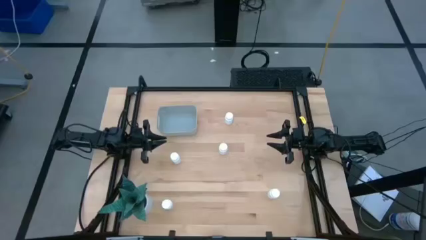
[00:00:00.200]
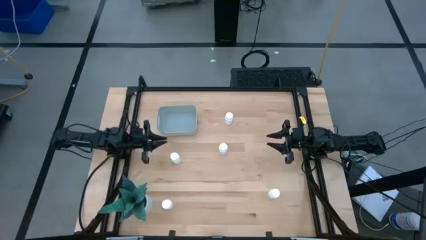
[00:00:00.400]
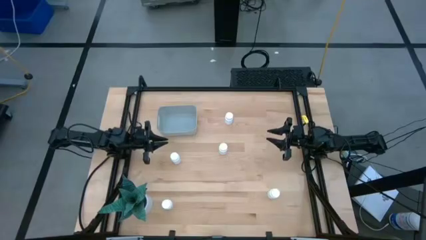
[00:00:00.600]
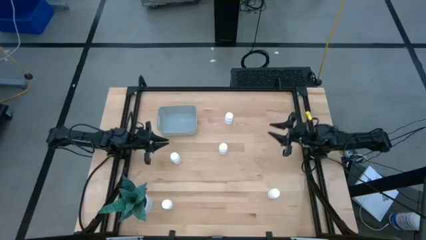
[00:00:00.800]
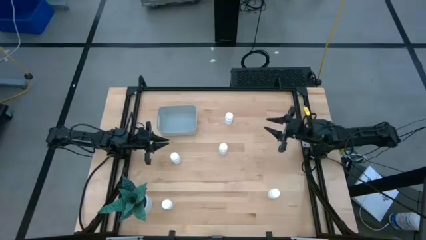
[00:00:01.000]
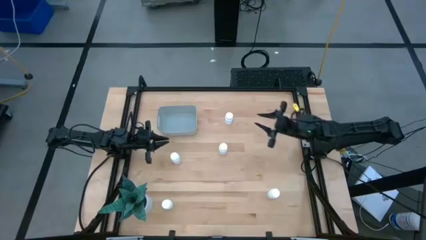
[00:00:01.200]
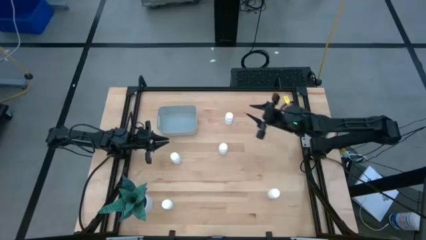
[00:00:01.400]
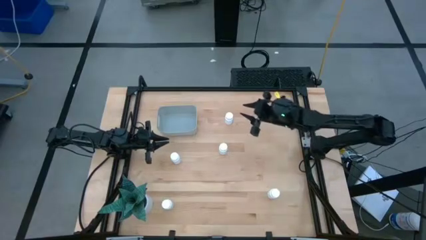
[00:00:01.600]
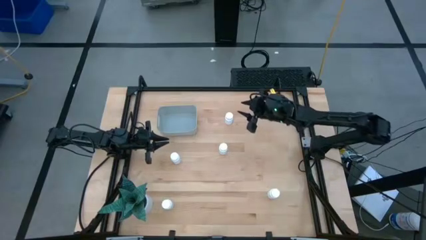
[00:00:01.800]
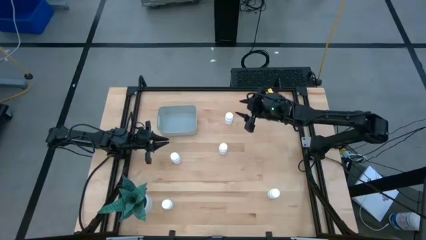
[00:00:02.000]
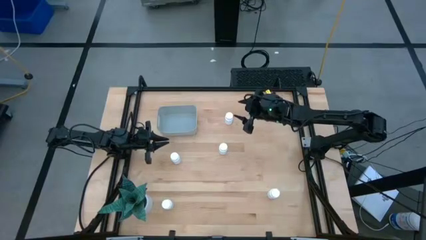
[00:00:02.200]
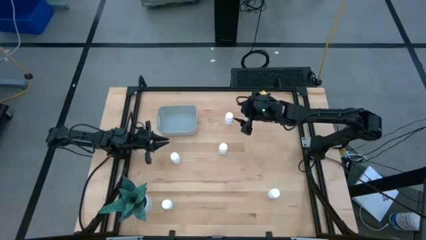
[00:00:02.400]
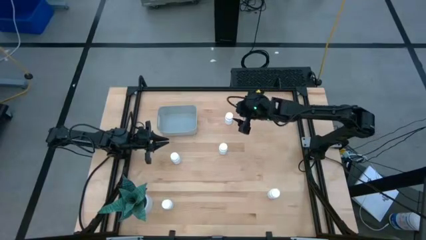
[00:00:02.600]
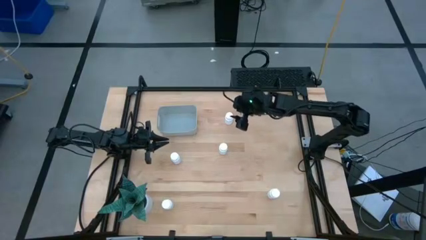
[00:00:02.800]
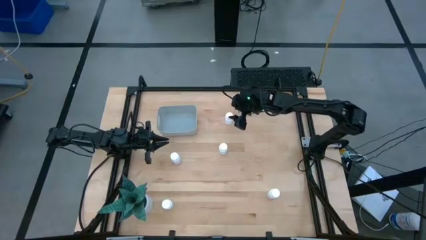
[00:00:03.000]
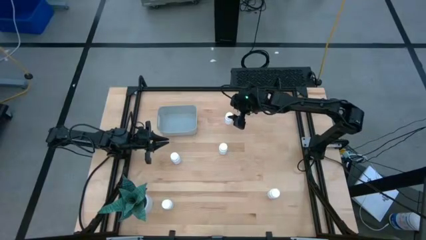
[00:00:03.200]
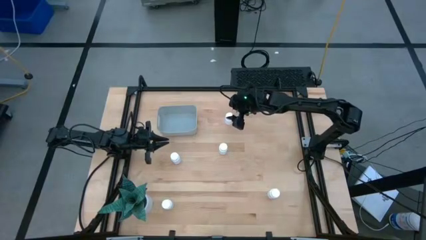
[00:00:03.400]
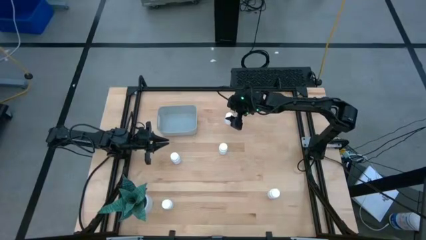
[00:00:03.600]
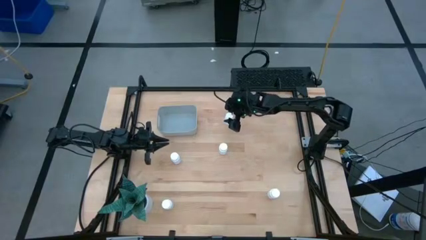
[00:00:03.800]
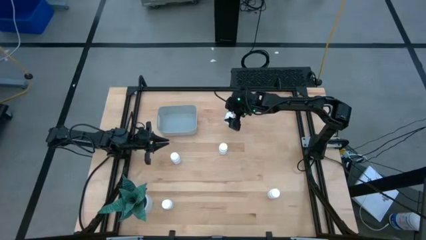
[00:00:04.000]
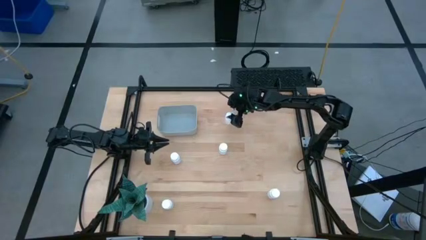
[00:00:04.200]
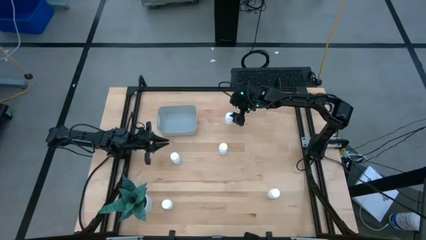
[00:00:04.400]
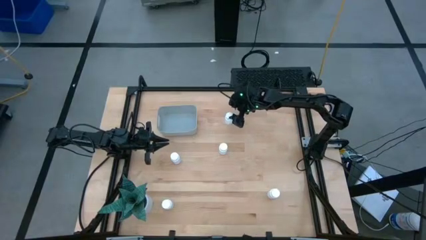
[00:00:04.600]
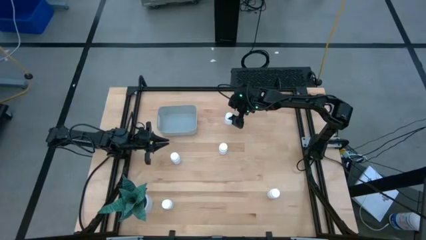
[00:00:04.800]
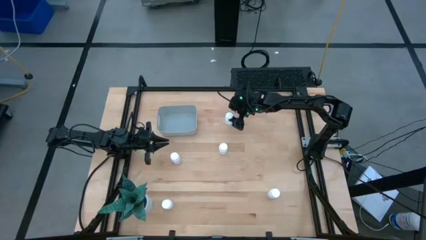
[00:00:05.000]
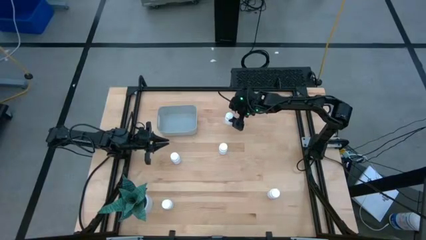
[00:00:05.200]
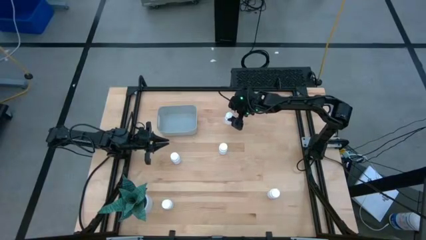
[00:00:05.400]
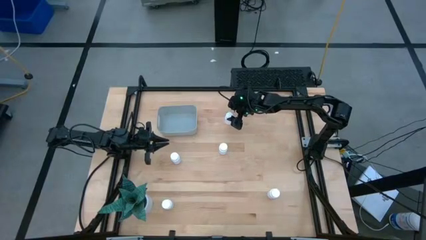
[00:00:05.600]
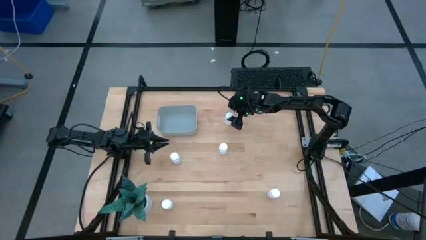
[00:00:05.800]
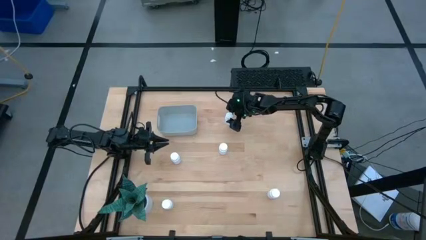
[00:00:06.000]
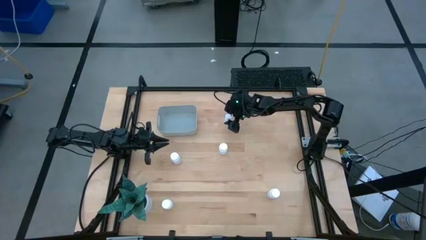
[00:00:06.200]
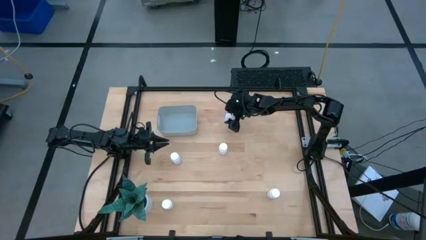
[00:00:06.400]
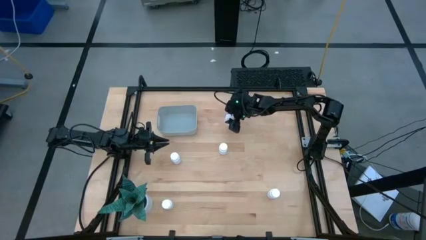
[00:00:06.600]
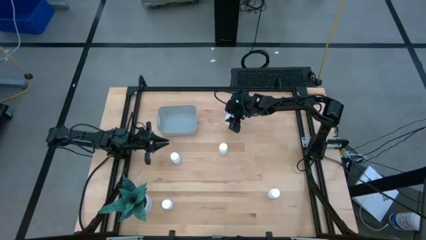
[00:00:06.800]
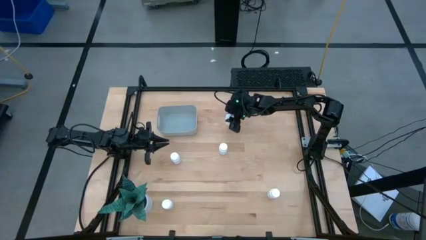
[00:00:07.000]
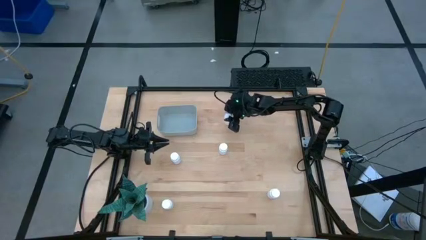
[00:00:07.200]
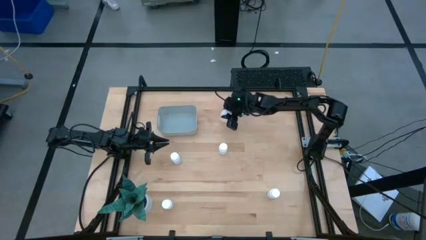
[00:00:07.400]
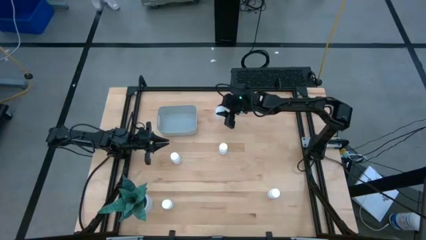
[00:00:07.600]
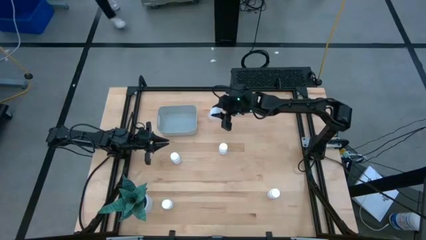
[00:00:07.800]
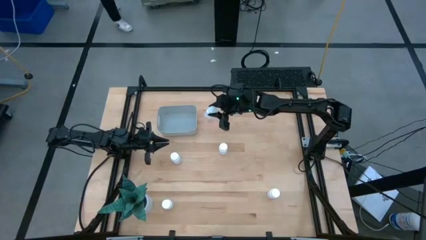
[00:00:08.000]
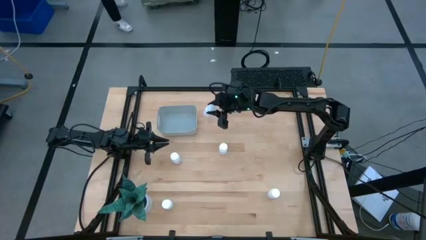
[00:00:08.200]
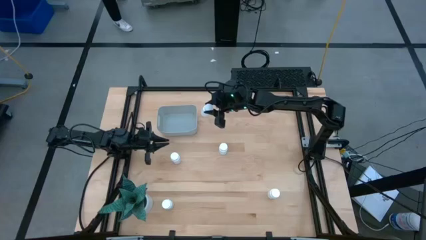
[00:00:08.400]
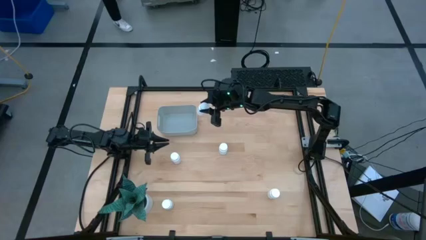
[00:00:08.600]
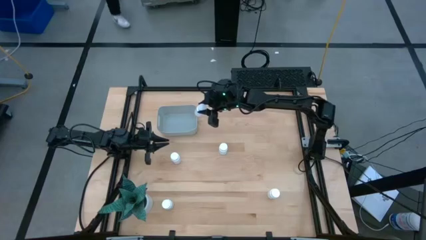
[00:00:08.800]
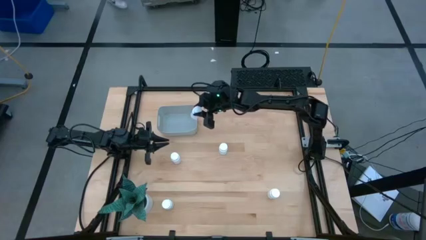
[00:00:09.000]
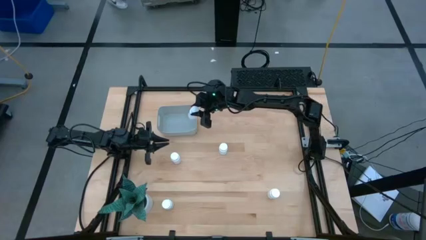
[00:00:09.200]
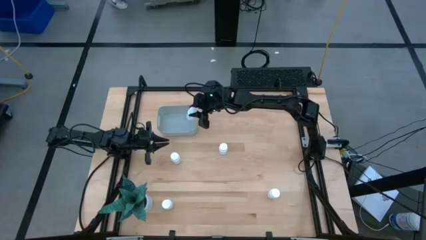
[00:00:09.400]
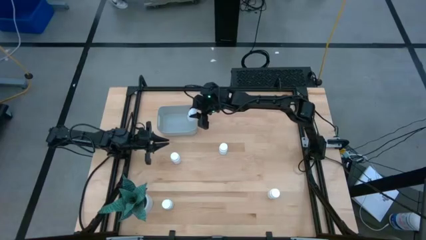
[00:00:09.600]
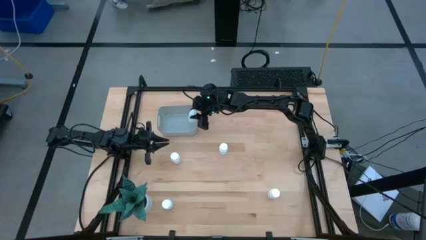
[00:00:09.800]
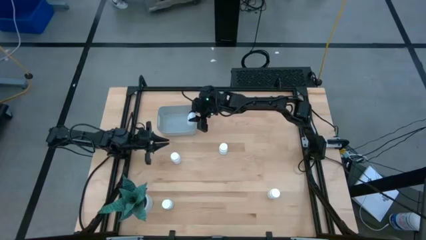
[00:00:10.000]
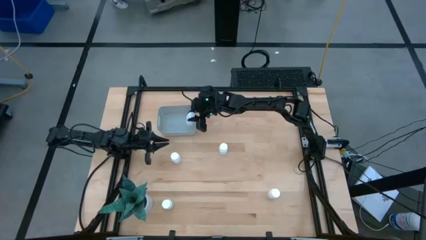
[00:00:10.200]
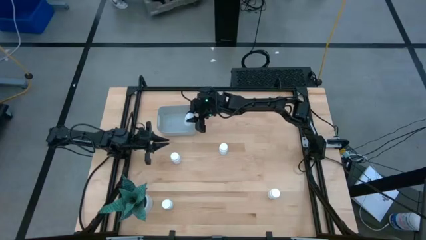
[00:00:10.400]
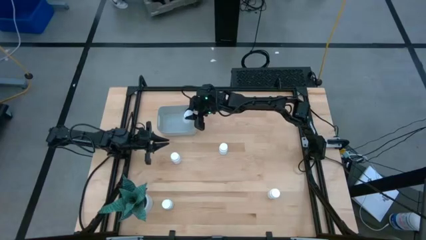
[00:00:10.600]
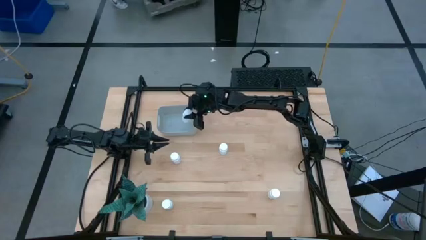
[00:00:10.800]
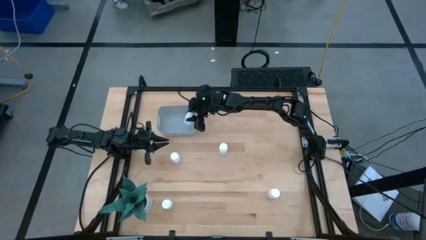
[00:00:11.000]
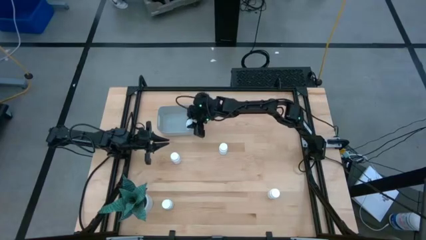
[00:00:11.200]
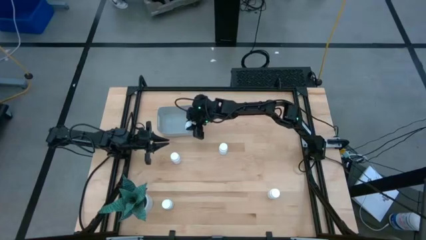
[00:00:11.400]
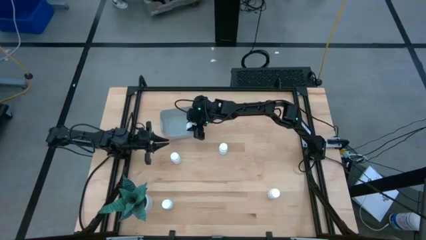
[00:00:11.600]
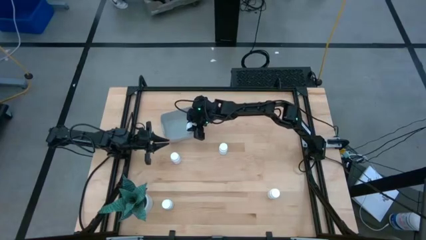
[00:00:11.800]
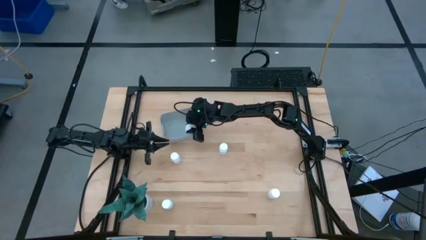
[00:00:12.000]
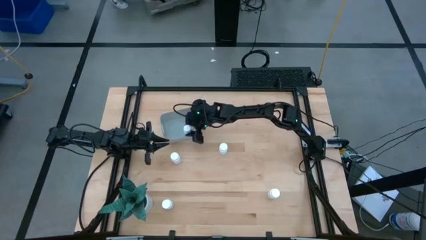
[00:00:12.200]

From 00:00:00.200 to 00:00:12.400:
Task: Pick and place pill bottles into a basket
Put the white pill bottle in the gray bin
